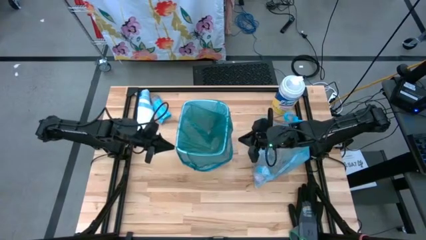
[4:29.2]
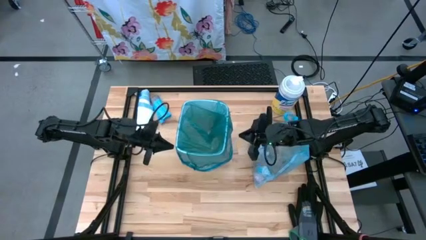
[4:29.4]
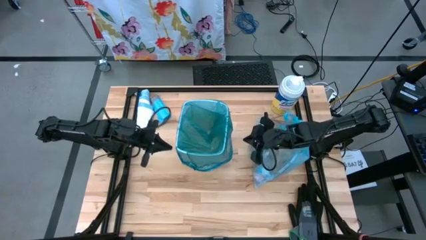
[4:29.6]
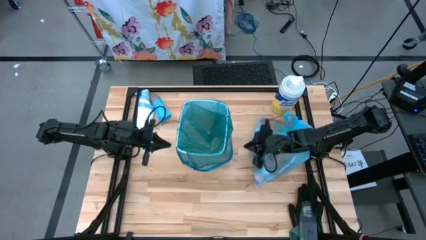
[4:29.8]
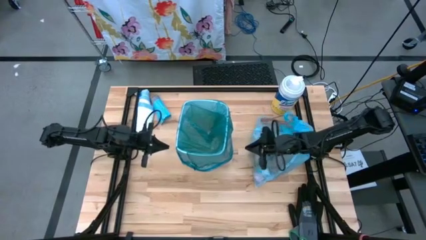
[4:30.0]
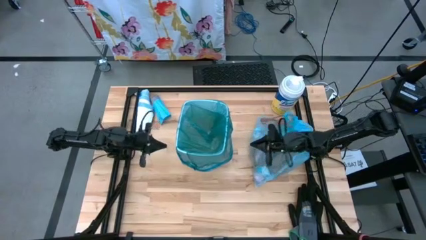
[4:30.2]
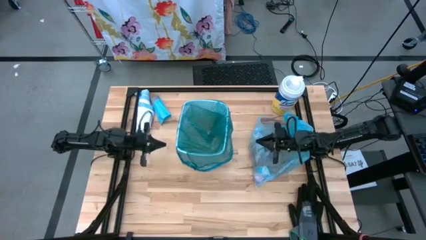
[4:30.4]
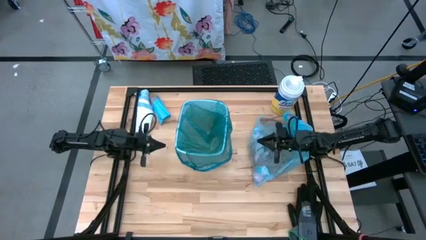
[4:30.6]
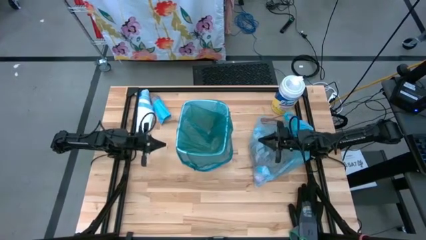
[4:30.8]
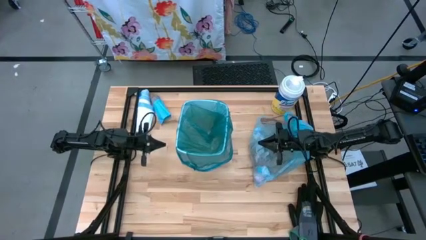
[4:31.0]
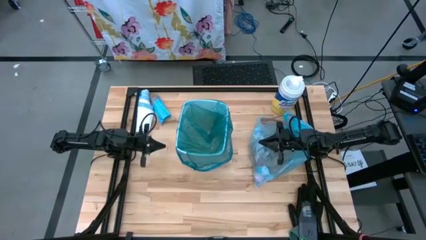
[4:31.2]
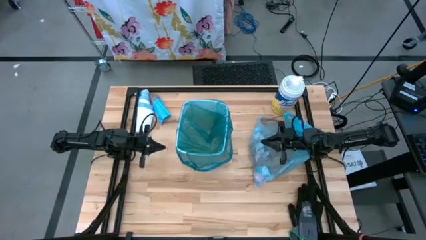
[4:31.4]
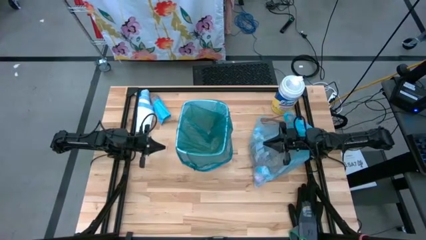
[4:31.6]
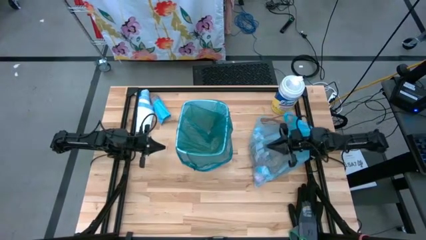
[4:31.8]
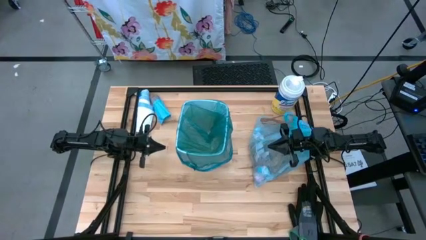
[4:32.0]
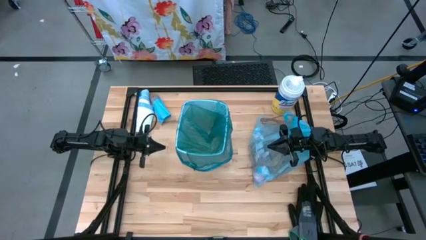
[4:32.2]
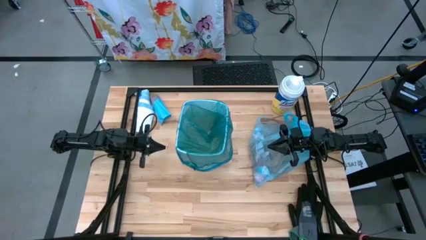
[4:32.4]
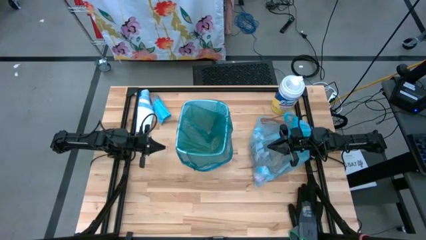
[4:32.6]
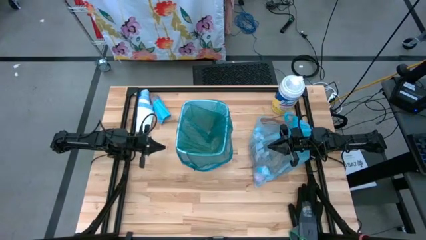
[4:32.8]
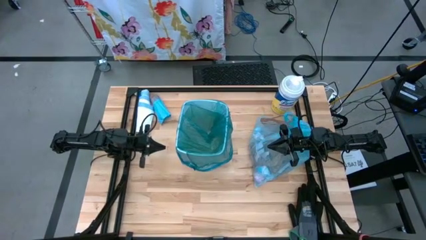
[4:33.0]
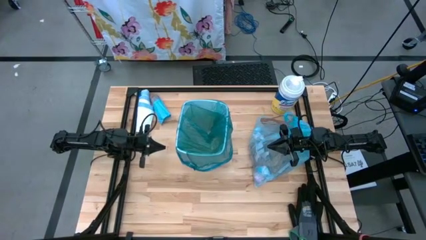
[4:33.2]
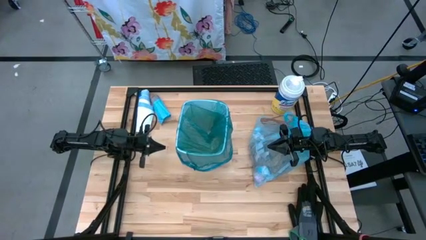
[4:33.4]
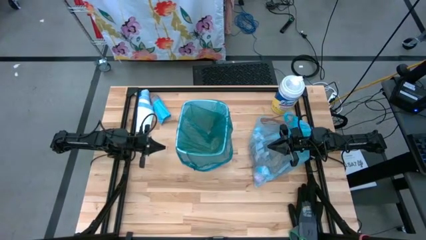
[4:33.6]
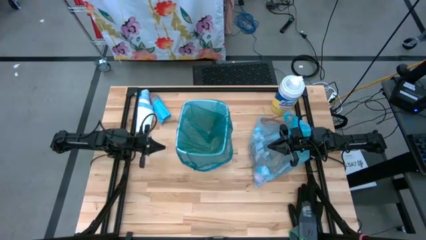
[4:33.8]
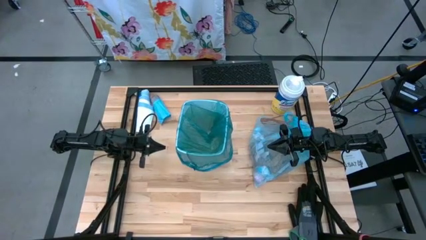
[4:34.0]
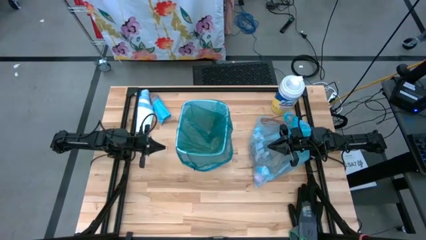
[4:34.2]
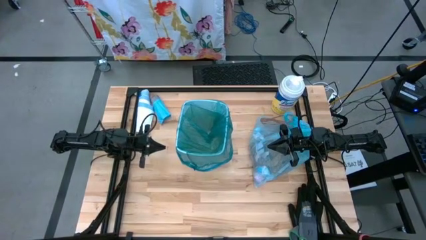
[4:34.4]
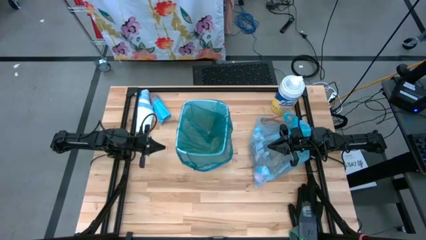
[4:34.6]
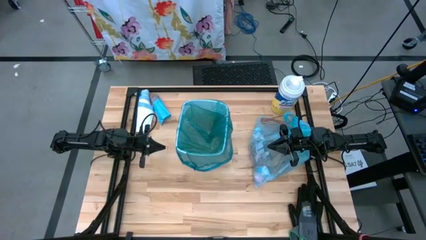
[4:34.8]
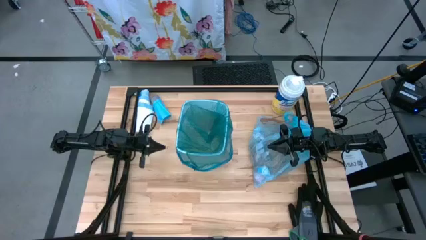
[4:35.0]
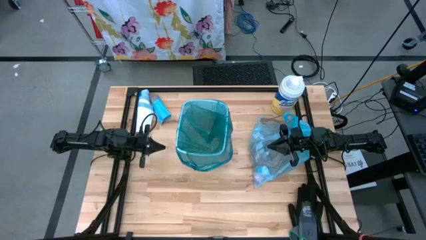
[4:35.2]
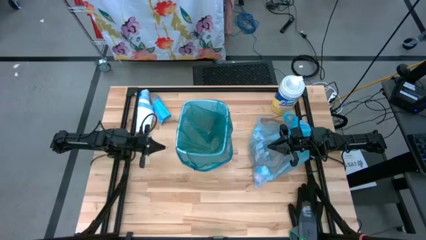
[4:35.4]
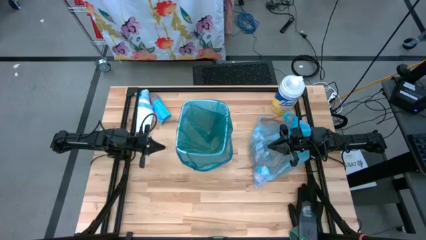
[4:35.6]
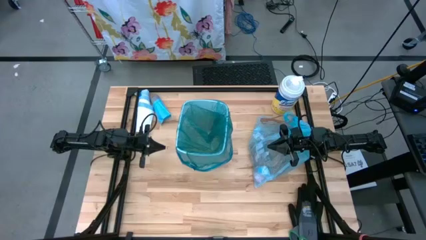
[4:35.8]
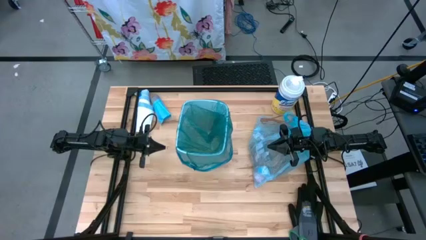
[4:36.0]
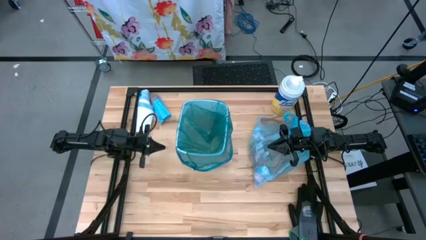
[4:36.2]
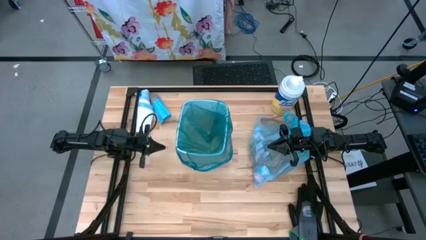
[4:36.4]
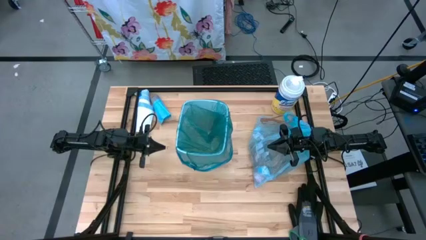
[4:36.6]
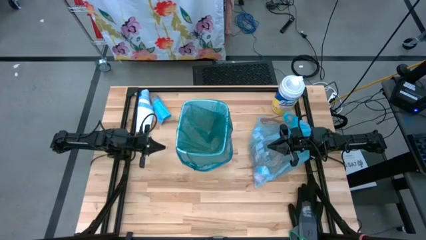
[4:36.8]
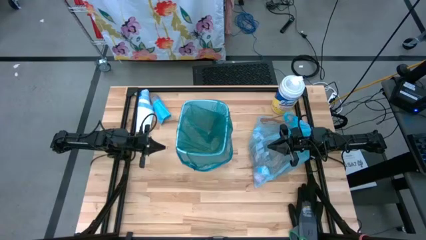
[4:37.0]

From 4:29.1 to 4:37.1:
Task: place trash/remove bag and relplace
Return to Home Position

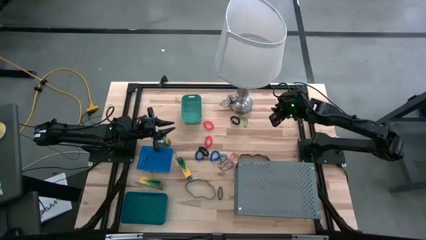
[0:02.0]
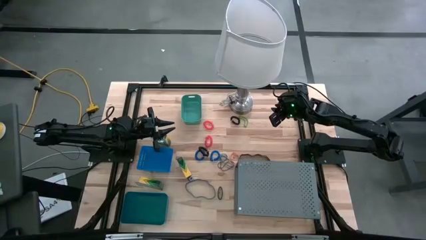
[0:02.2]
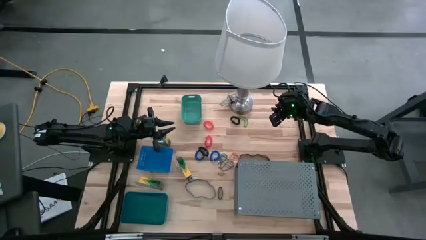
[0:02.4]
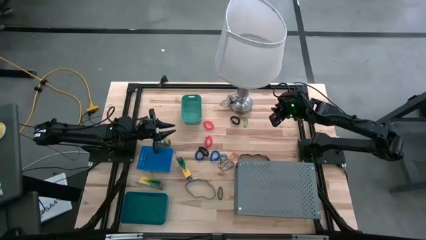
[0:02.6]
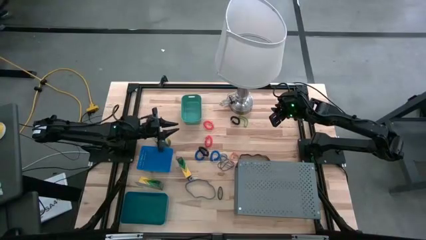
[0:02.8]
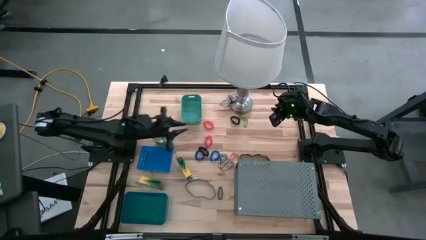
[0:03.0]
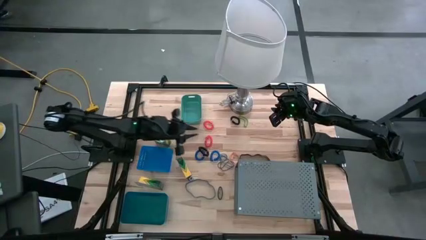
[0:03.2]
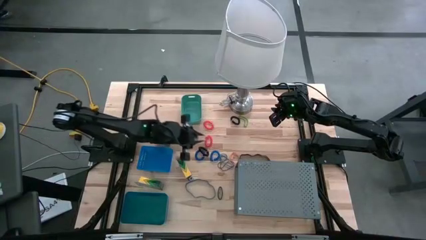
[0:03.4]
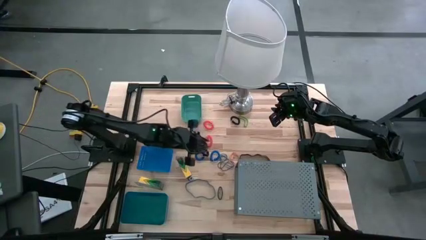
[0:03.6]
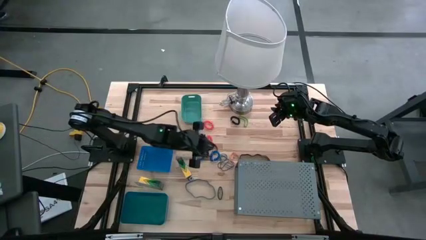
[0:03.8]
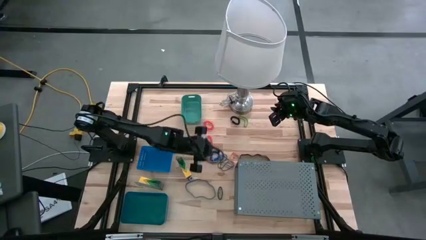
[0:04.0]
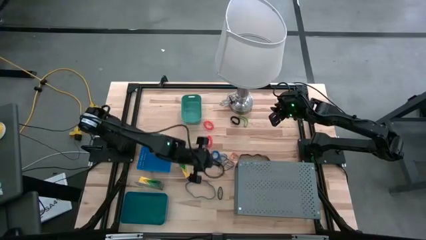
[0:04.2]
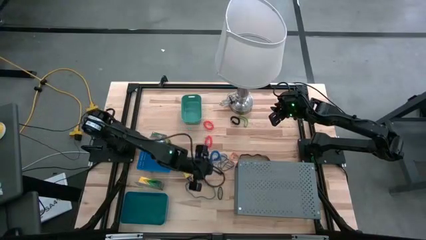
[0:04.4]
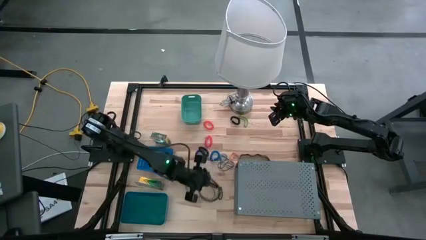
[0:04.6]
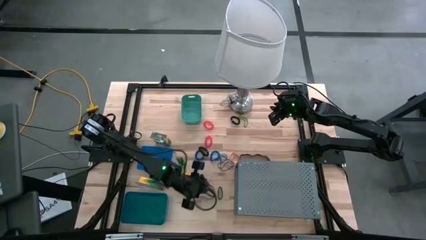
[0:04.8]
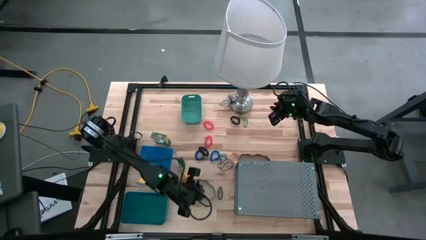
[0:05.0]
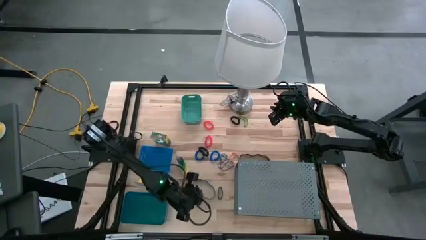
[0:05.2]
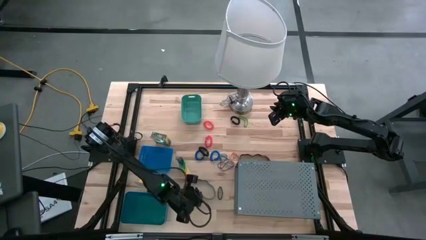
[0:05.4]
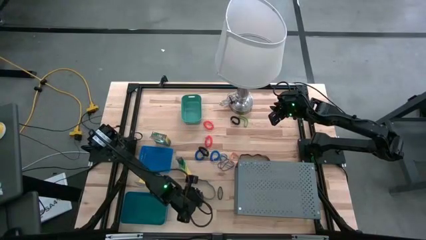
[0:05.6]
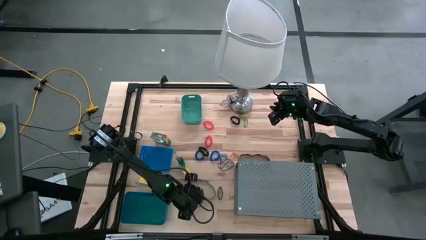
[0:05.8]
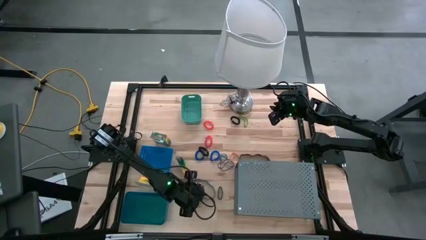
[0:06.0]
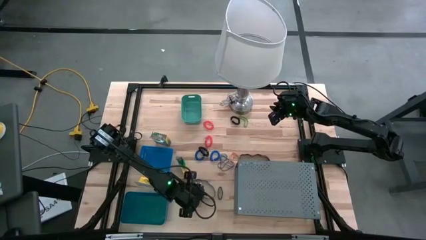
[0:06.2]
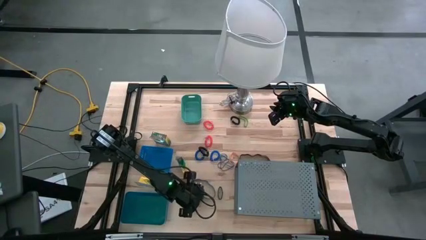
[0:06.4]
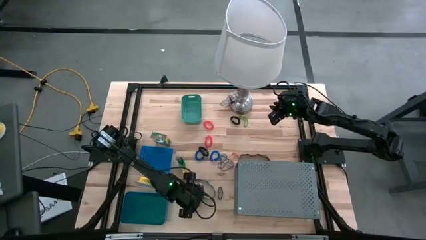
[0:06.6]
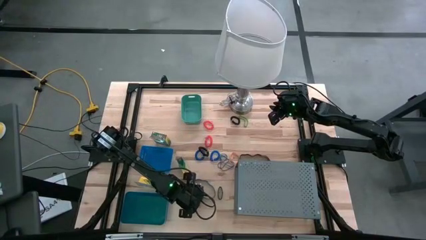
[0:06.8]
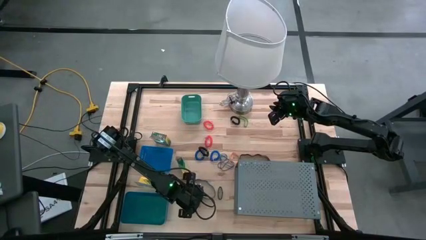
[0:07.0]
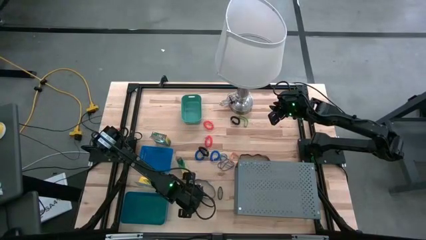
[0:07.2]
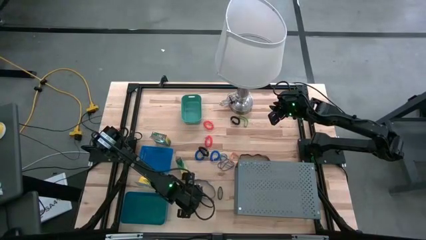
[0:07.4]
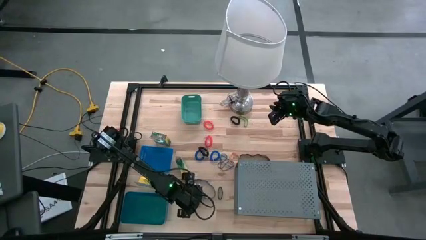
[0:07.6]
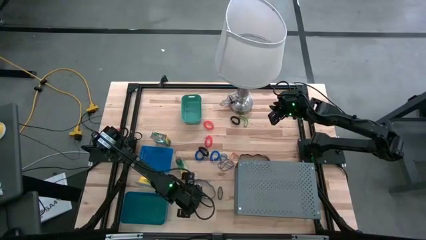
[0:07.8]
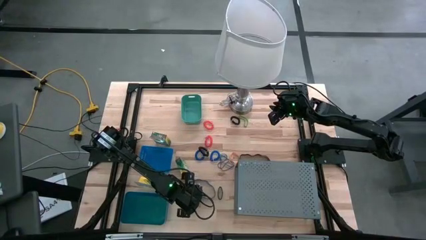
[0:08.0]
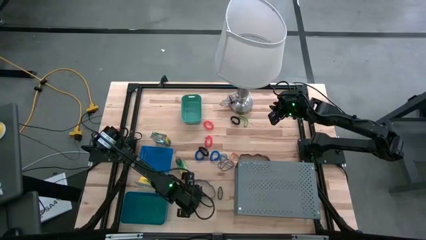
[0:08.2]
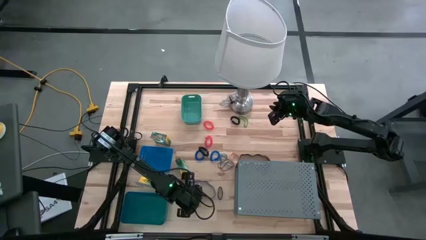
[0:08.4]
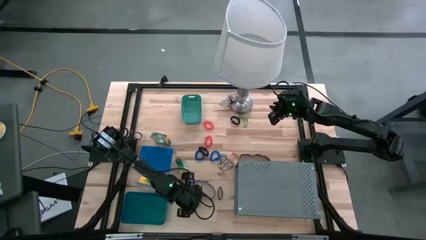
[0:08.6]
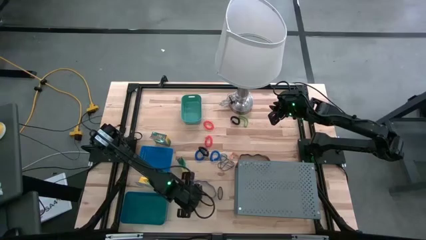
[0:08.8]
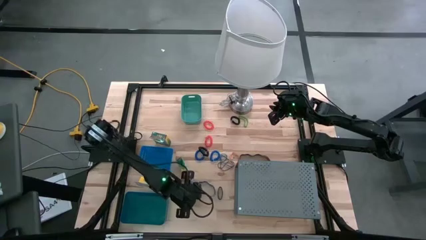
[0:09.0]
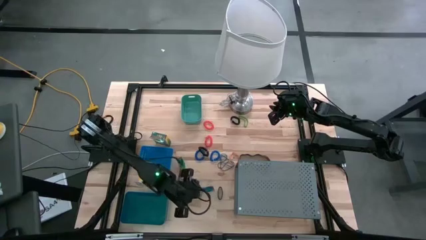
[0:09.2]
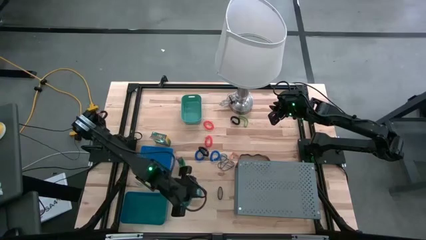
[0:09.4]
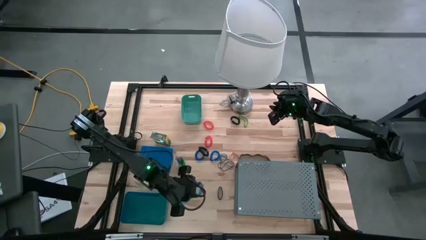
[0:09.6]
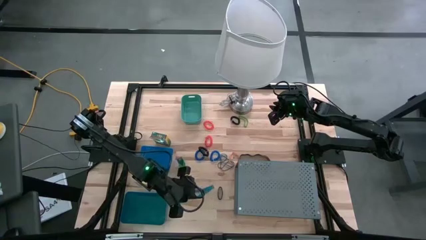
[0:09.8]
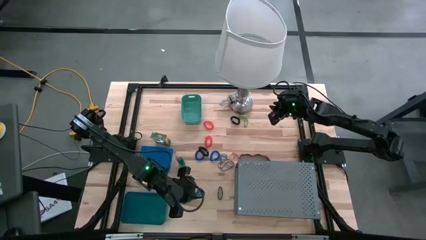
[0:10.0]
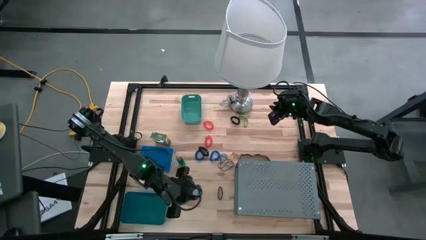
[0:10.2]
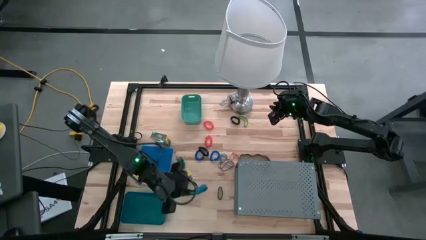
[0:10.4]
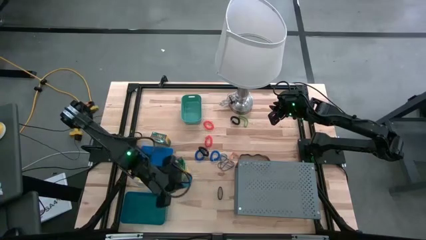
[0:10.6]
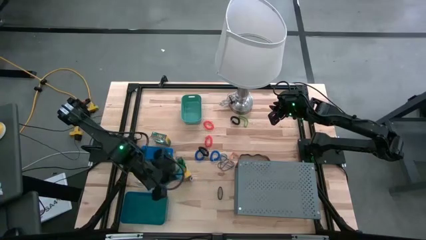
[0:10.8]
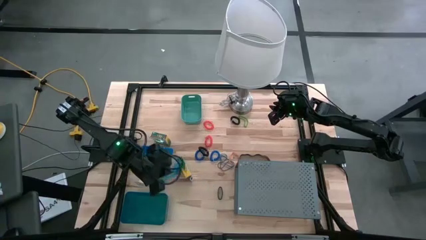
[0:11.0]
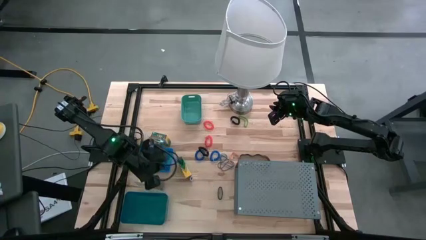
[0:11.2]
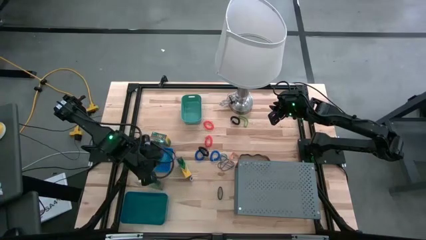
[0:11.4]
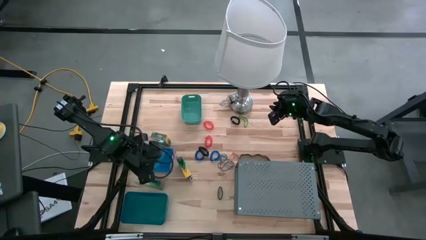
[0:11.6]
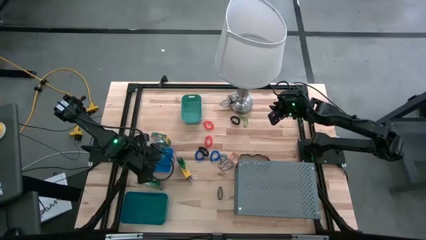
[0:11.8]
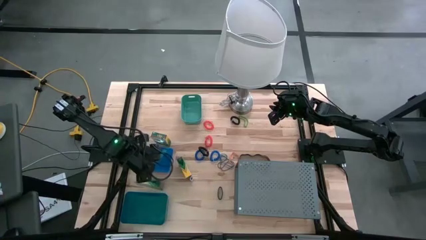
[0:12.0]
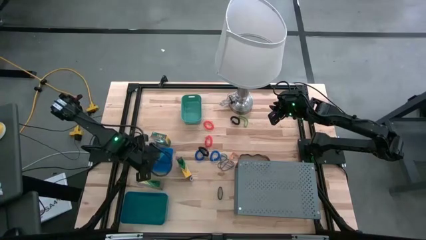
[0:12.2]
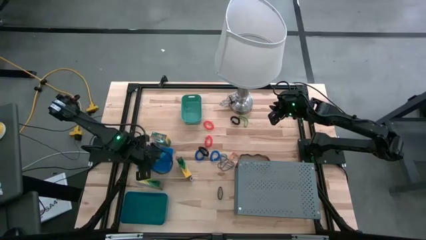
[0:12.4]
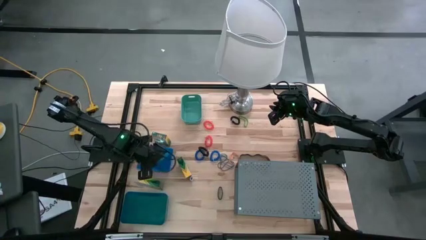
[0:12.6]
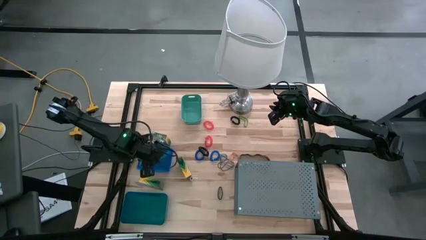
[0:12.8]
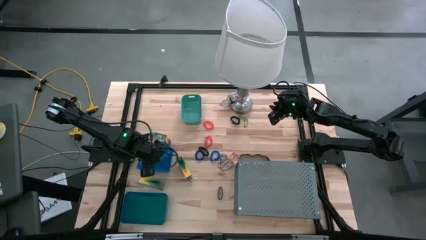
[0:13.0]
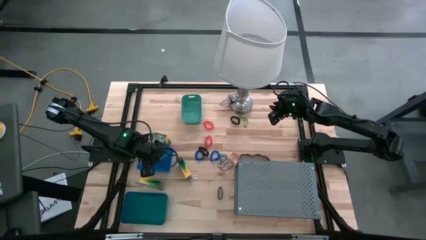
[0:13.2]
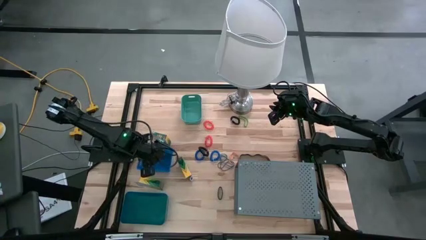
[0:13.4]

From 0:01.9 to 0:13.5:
Task: Pick & Place Office Desk Supplies
Put the blue rubber bands into the top blue bin
